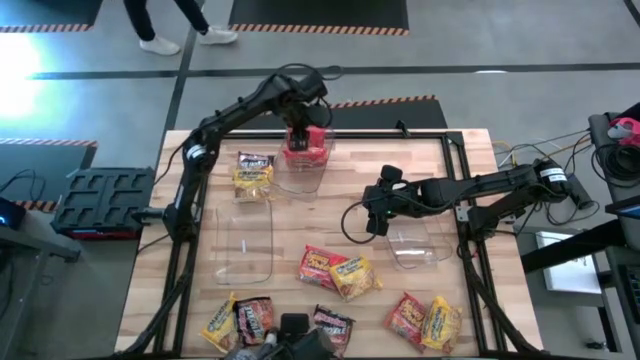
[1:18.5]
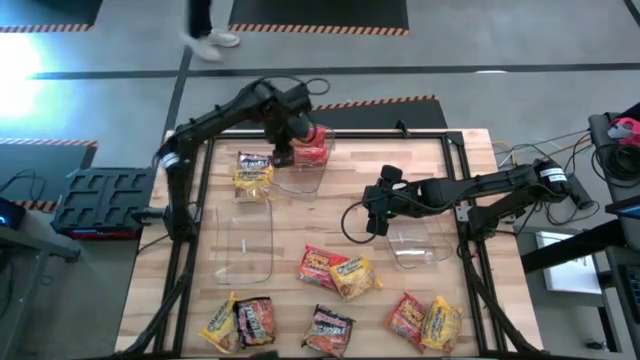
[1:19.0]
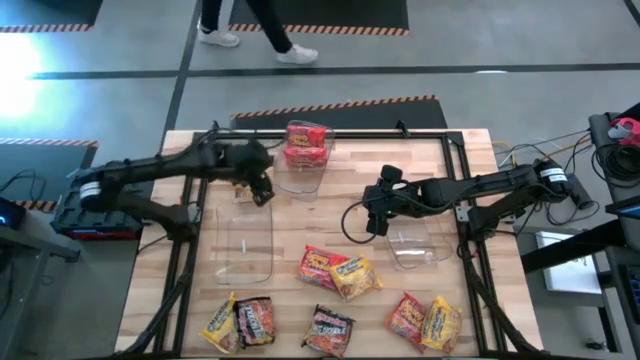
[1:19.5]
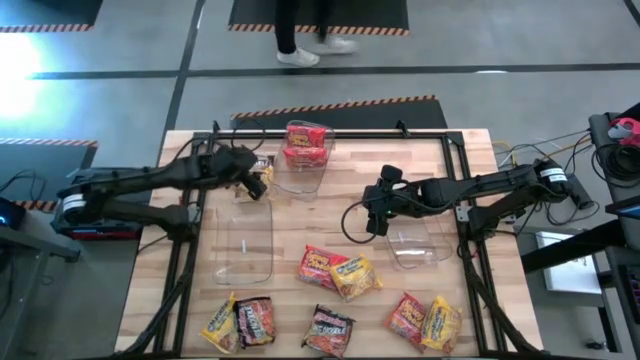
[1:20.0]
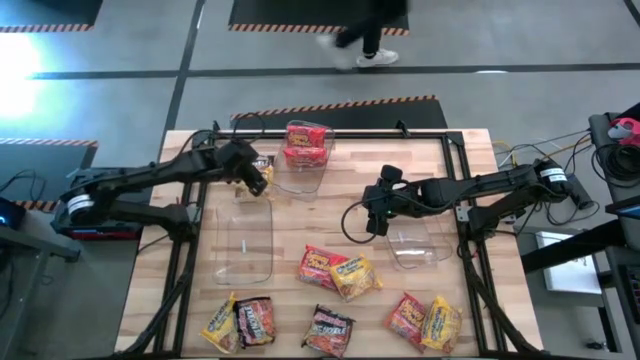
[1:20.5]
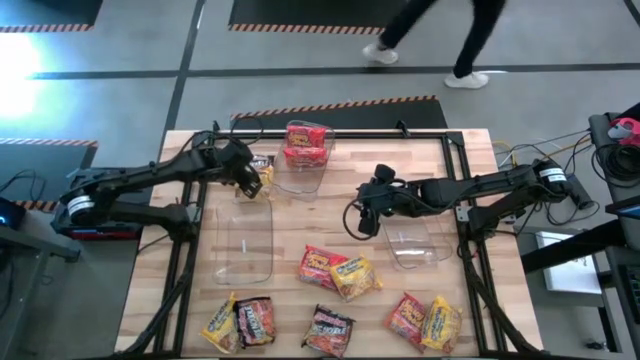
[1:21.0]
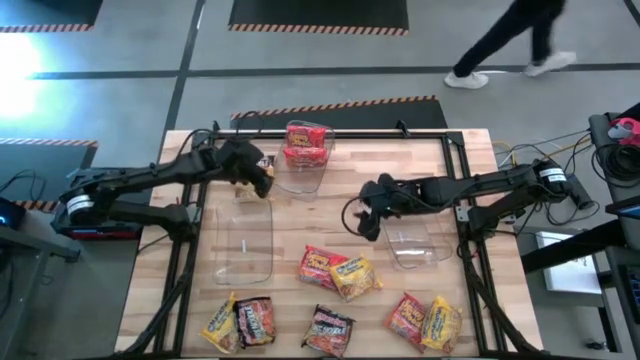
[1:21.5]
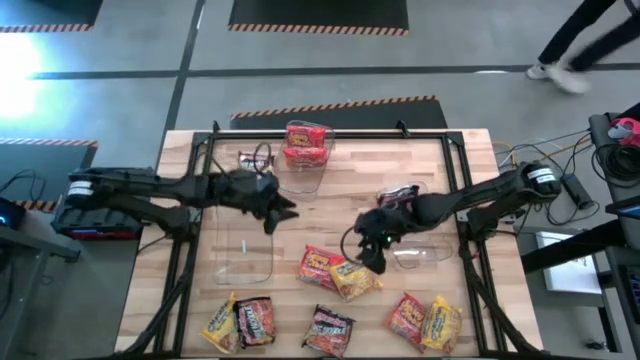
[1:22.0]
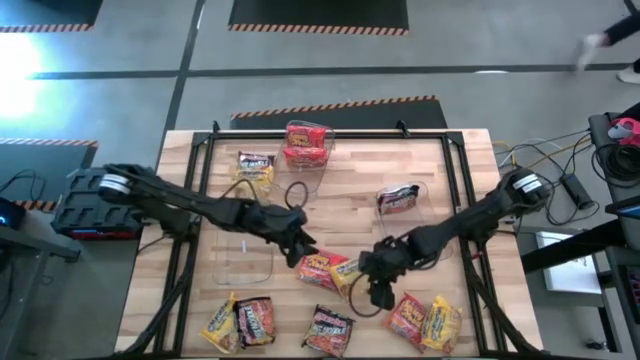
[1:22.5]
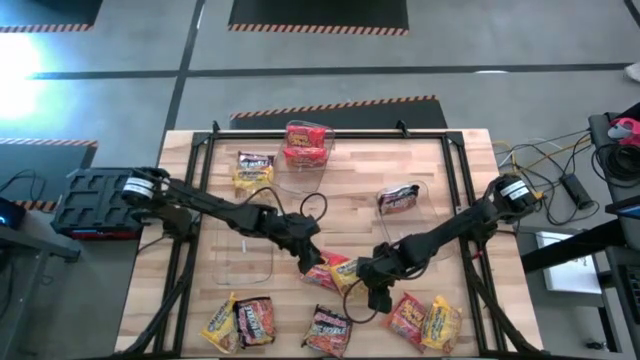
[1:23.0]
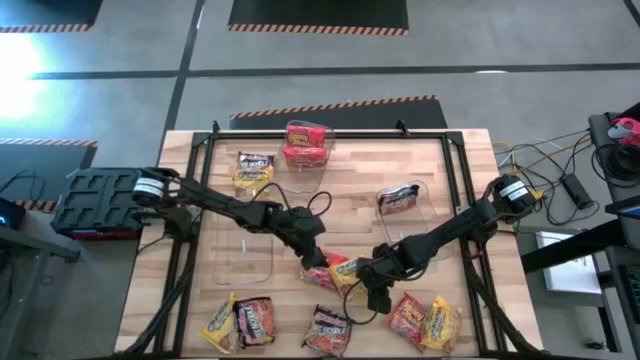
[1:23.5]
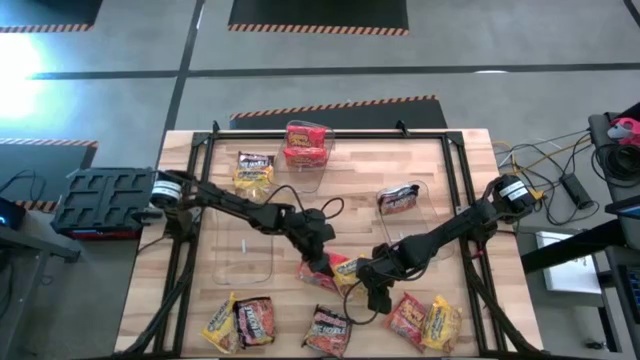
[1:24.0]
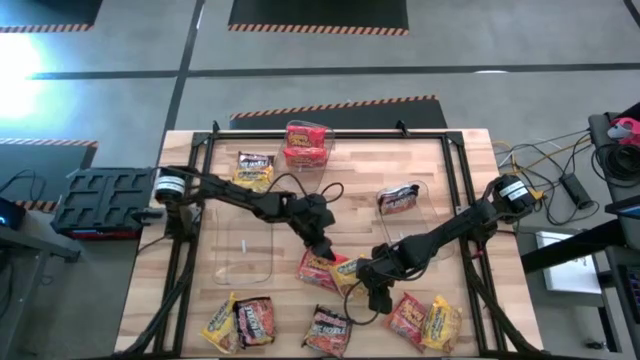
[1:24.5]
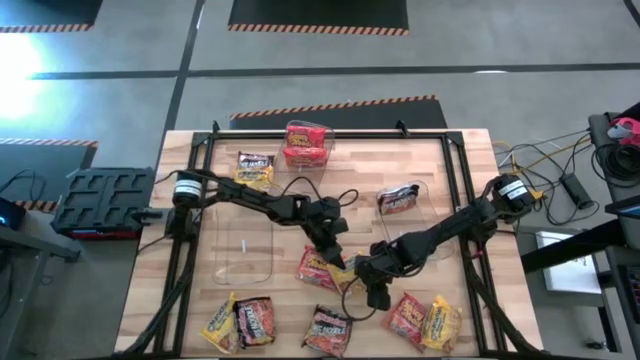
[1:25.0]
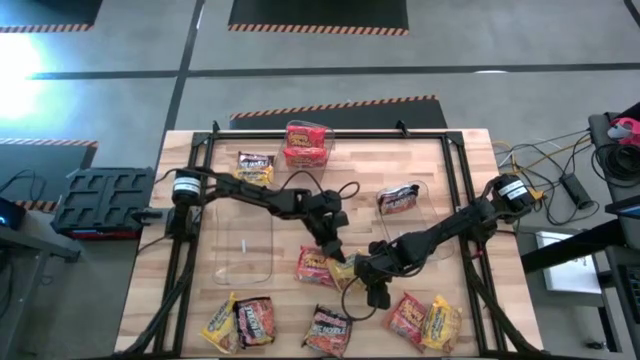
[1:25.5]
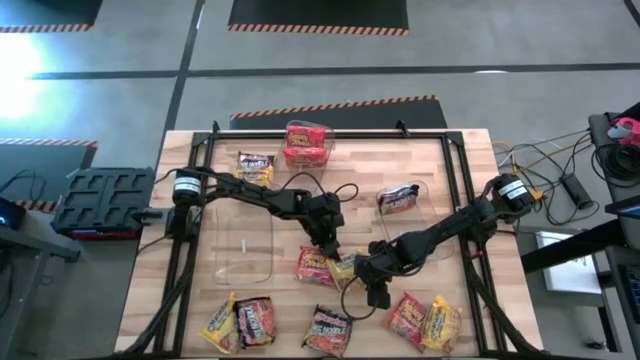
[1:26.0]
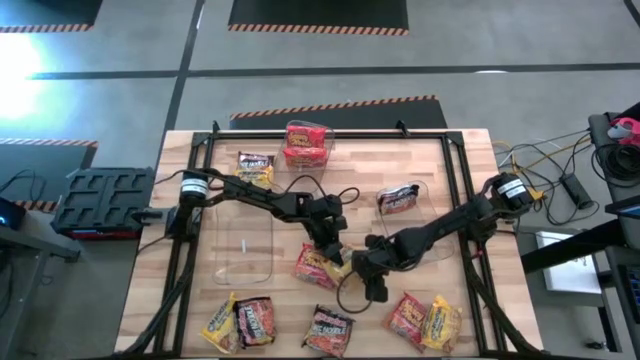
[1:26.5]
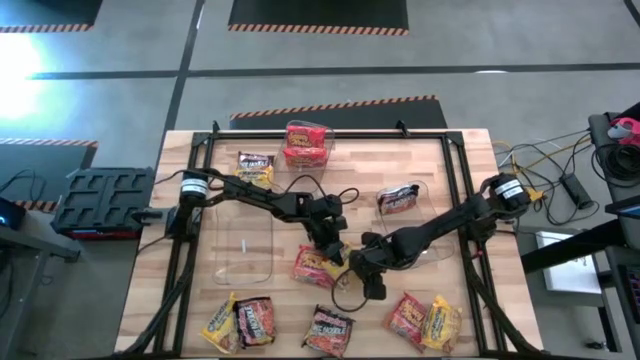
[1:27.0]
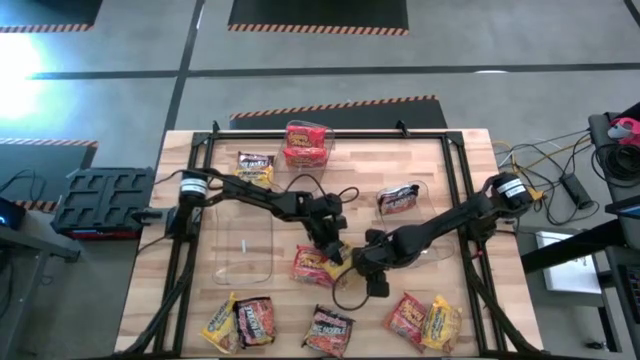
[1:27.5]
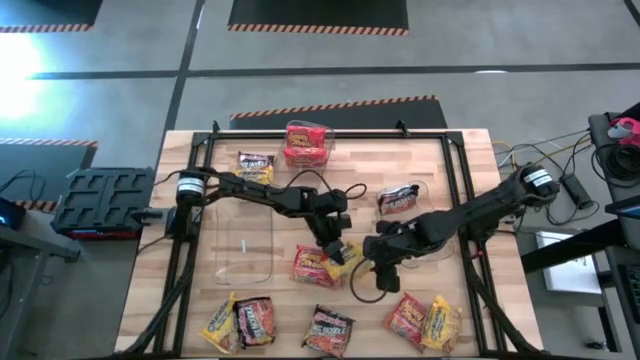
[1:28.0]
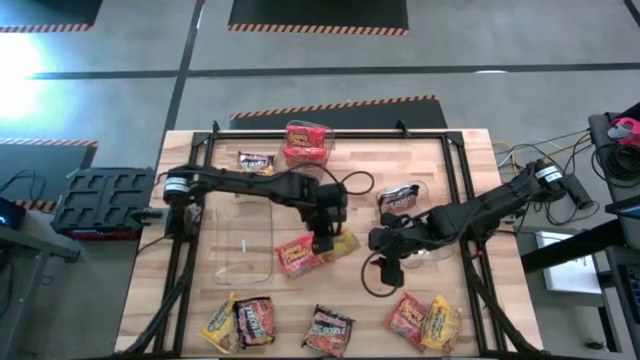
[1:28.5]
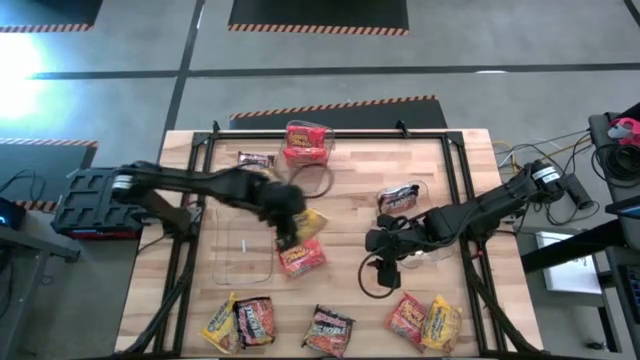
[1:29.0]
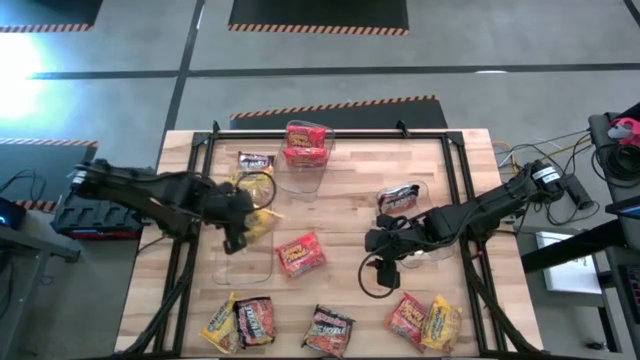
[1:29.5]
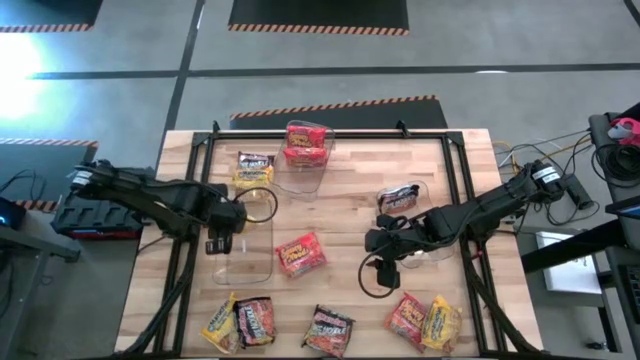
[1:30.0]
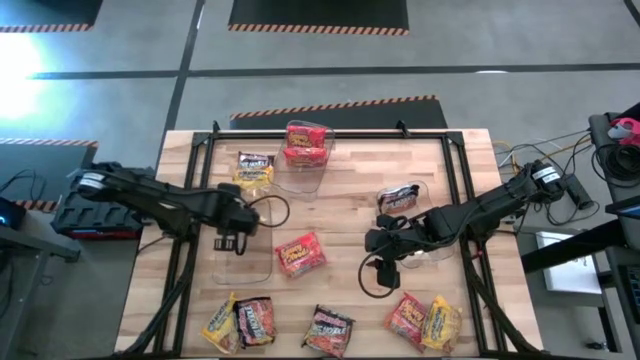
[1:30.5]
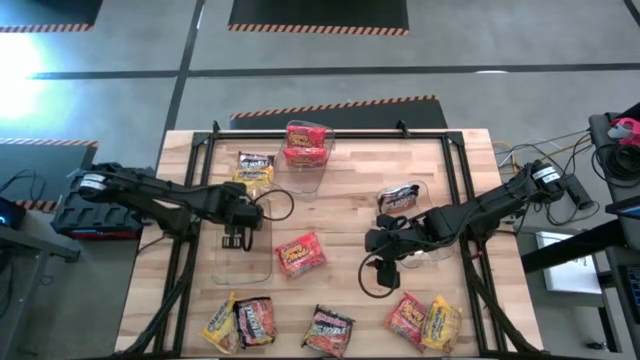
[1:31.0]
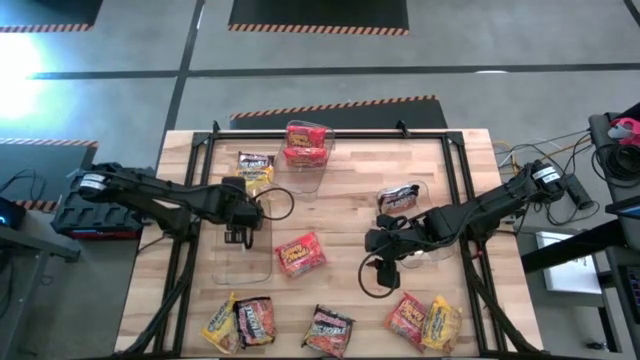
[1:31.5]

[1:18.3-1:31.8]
Task: Sort Maruchan noodles
Put the top right yellow pack noodle into the bottom left transparent bin

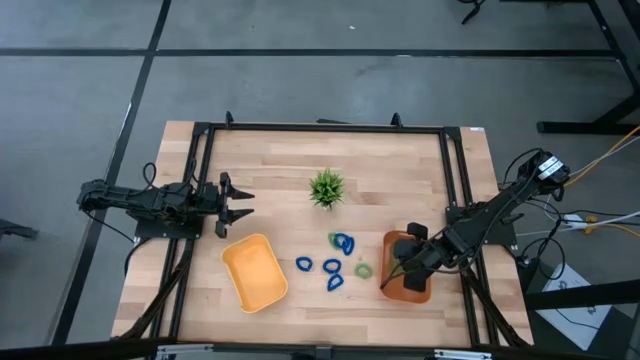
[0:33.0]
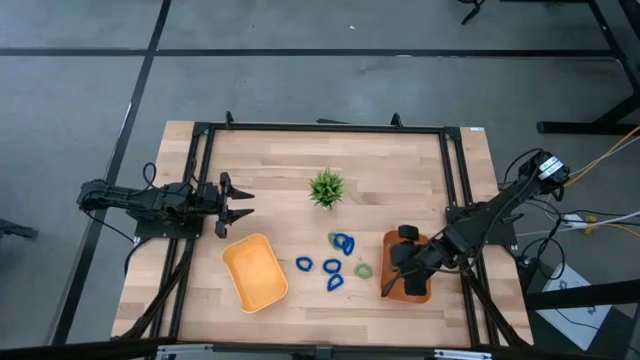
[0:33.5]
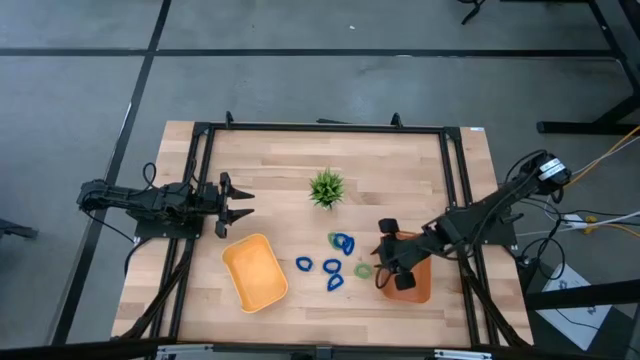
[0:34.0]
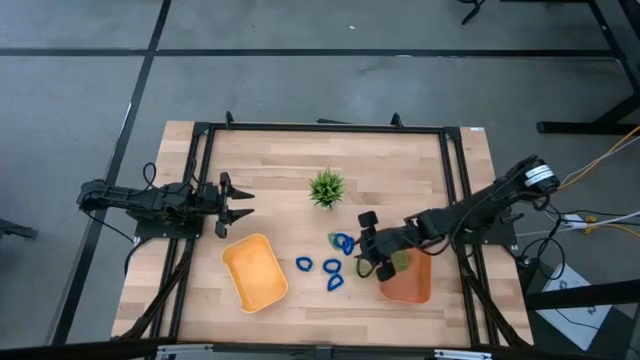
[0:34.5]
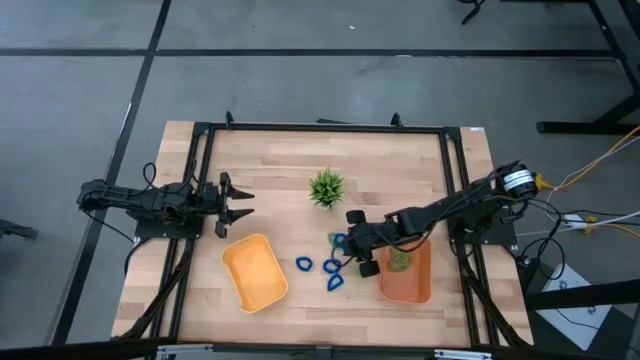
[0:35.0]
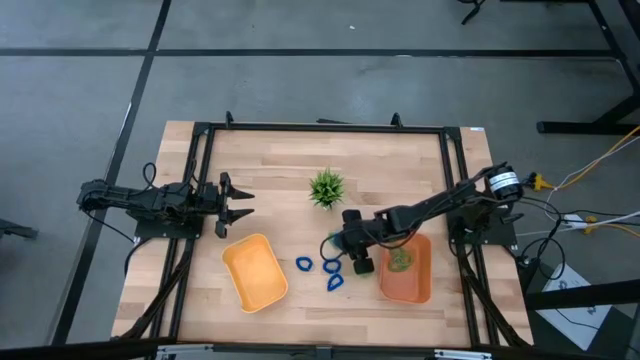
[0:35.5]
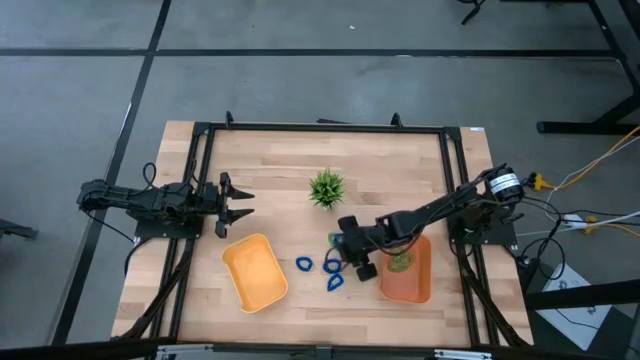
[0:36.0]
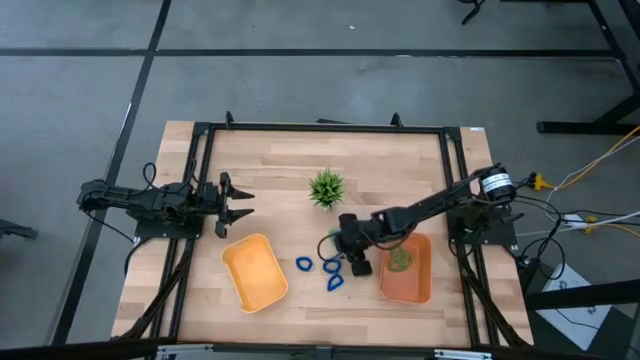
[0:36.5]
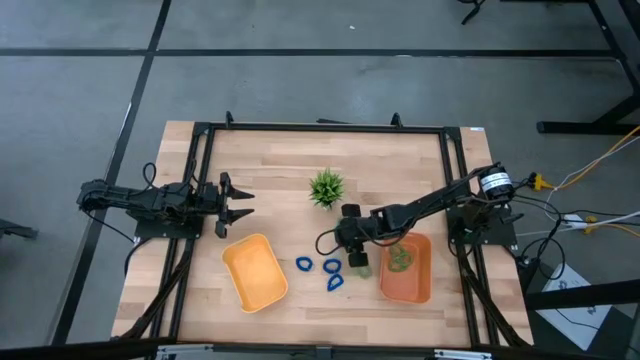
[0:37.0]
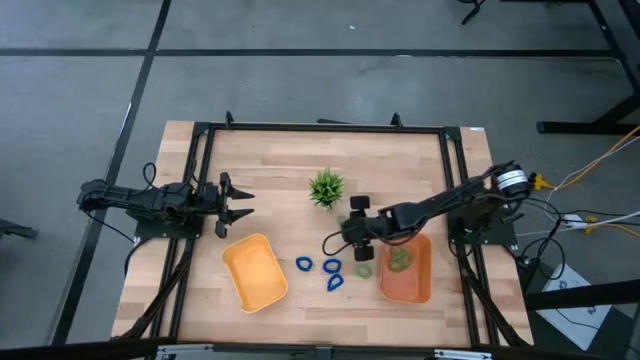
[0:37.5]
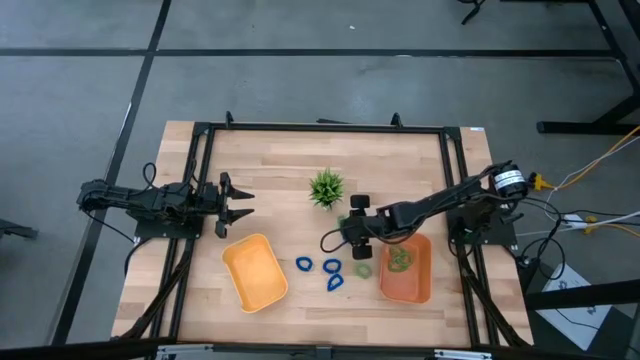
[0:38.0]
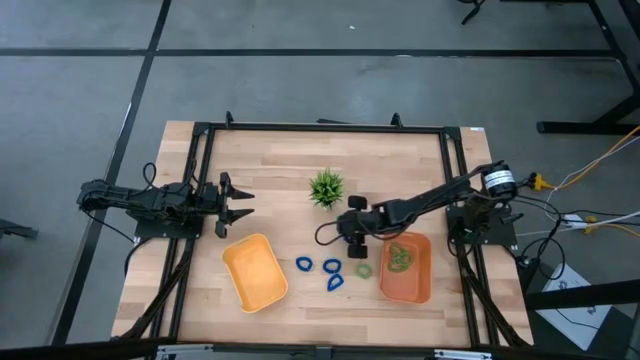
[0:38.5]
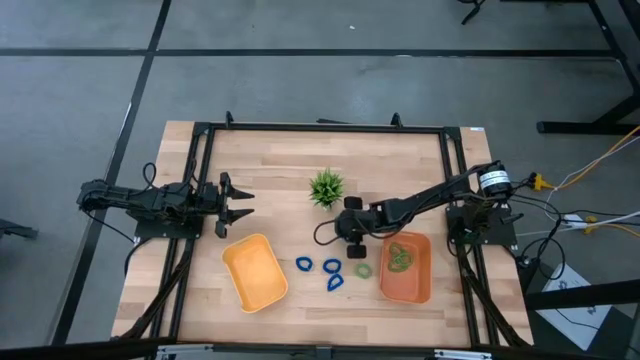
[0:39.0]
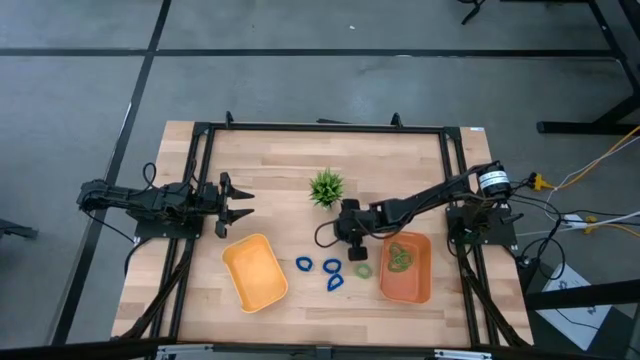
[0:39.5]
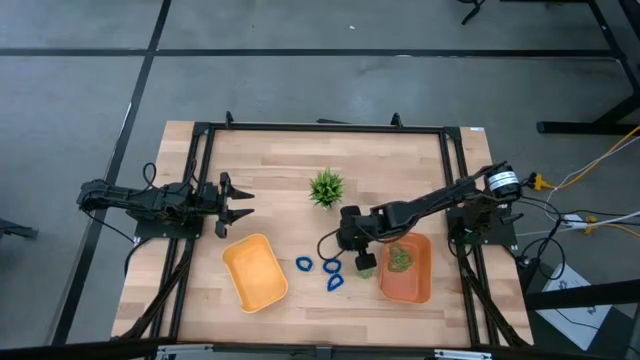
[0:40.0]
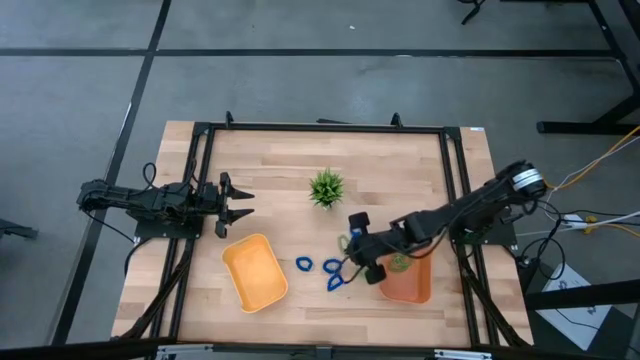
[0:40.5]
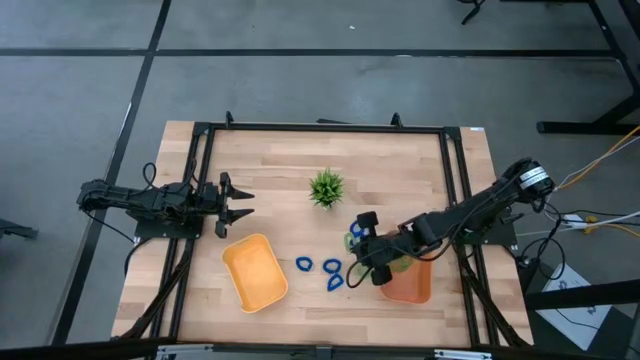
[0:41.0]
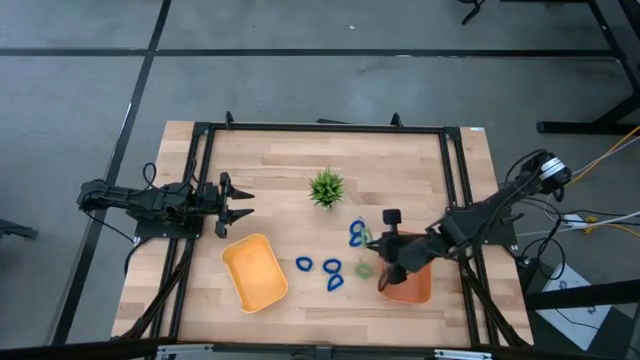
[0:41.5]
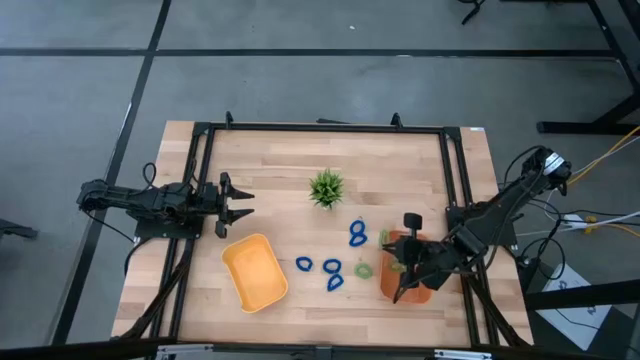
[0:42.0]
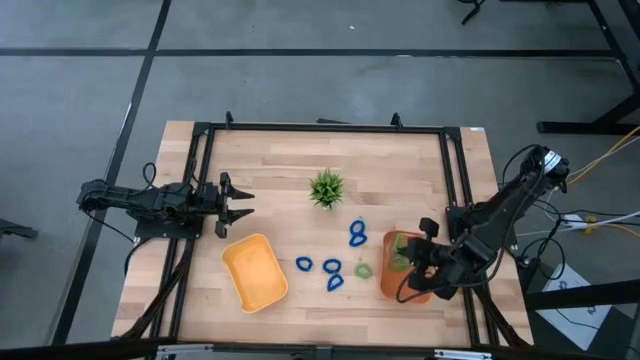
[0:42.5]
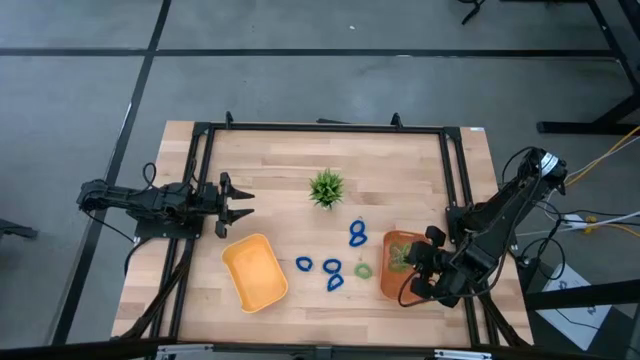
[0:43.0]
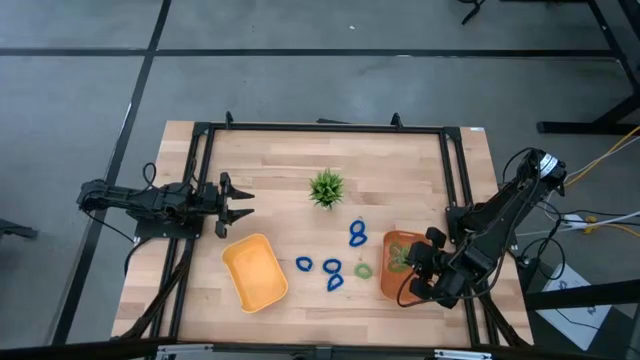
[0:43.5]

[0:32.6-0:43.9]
Task: Sort spring keychains
Put the green spring keychain into the orange bin
